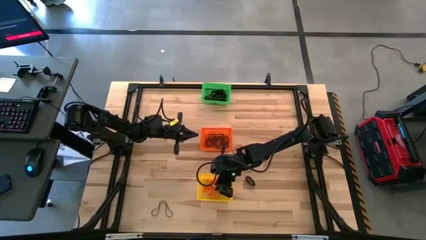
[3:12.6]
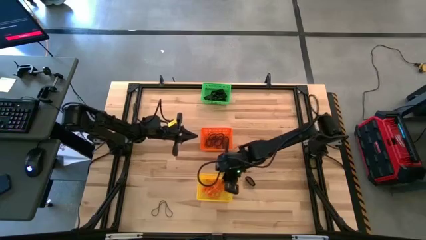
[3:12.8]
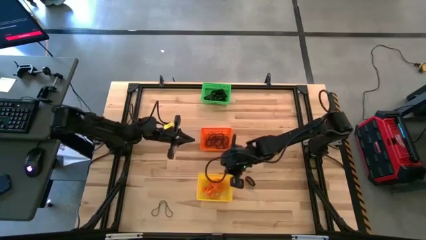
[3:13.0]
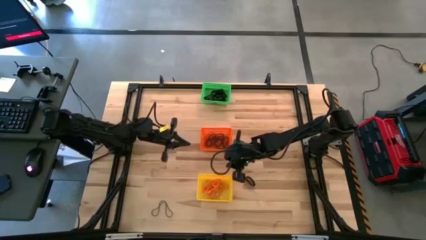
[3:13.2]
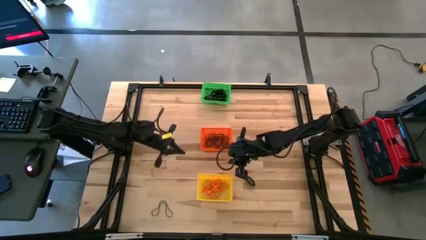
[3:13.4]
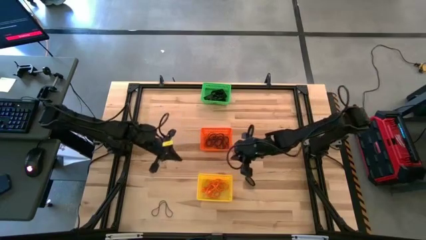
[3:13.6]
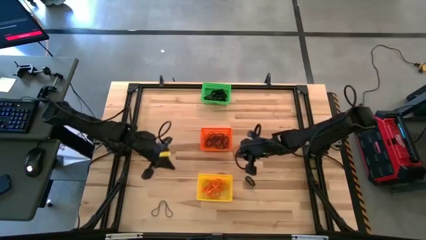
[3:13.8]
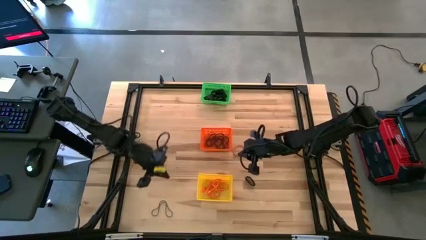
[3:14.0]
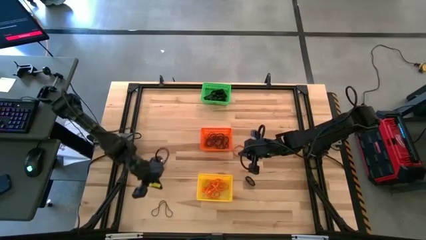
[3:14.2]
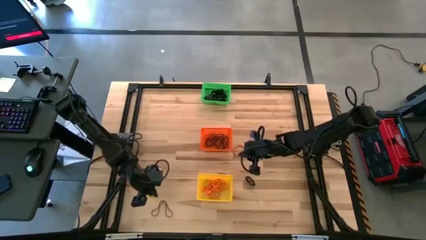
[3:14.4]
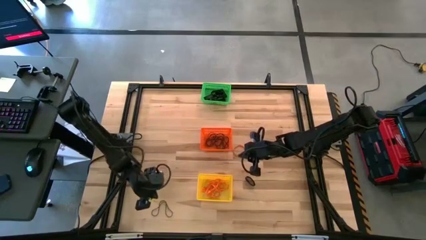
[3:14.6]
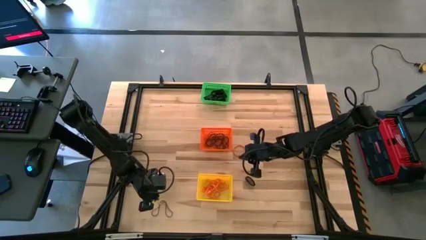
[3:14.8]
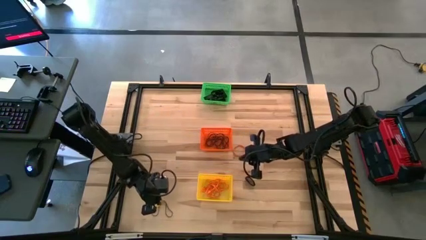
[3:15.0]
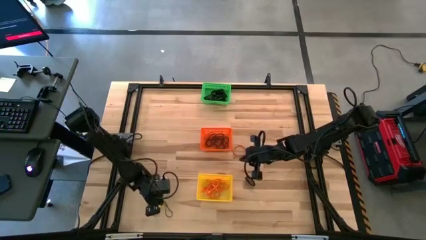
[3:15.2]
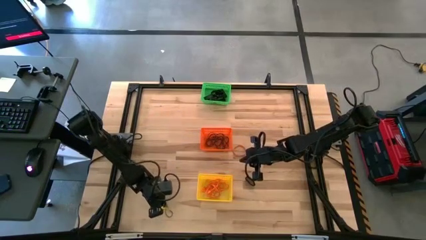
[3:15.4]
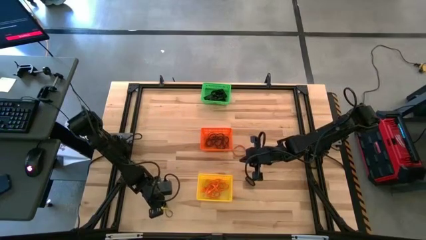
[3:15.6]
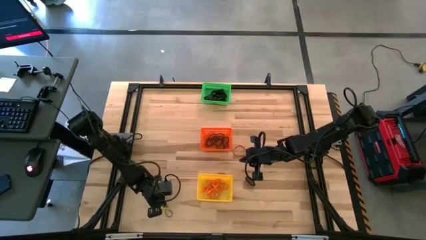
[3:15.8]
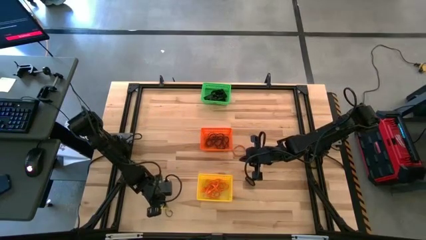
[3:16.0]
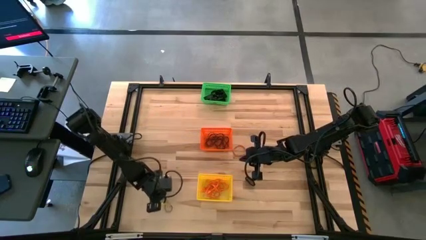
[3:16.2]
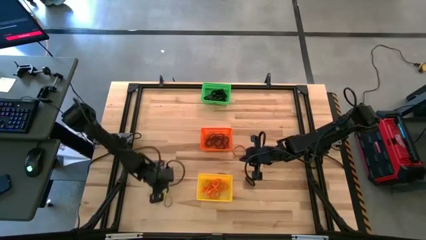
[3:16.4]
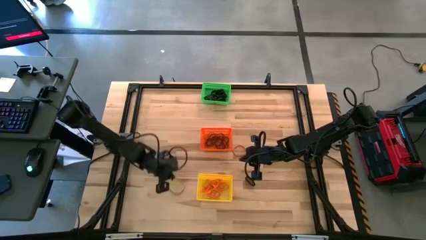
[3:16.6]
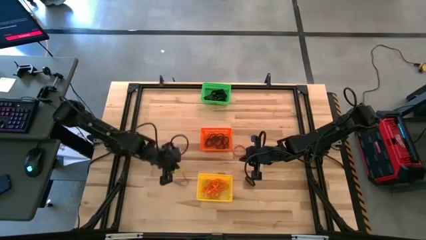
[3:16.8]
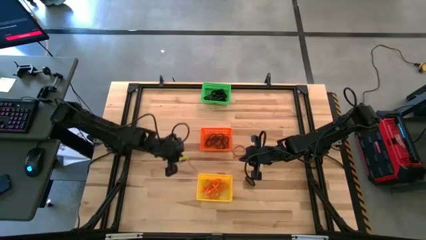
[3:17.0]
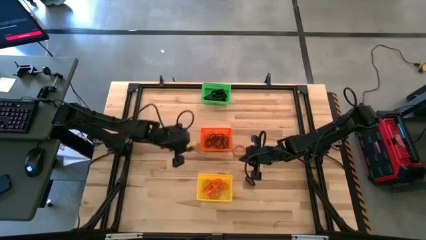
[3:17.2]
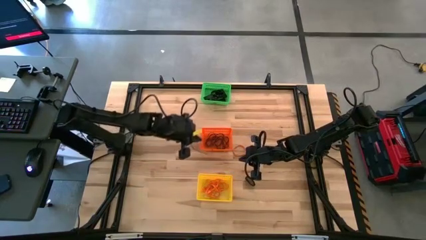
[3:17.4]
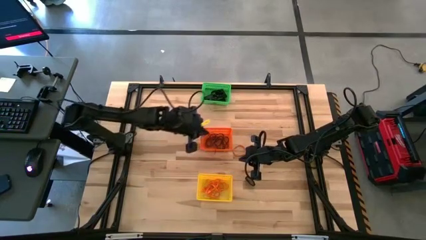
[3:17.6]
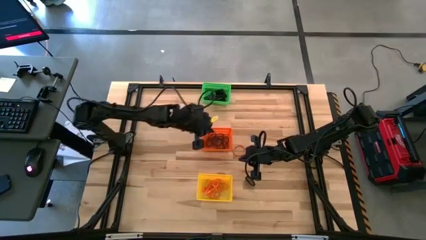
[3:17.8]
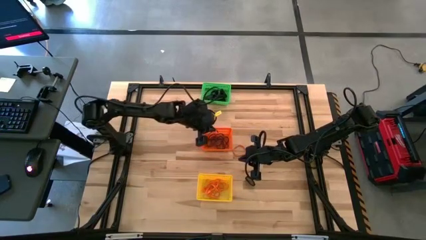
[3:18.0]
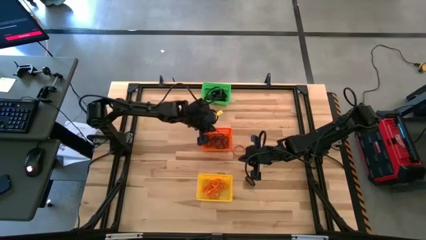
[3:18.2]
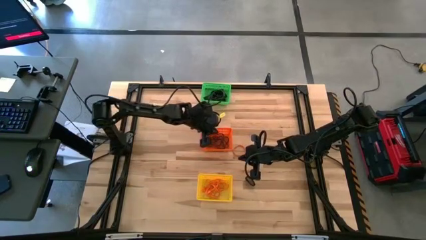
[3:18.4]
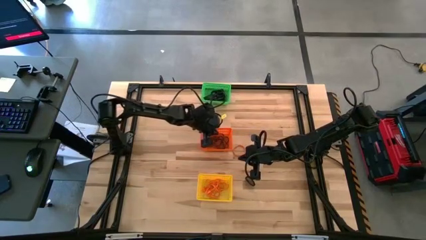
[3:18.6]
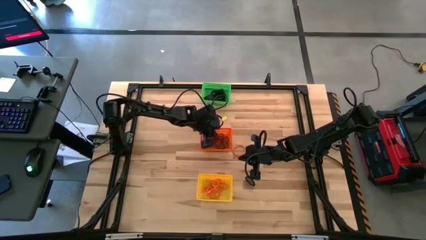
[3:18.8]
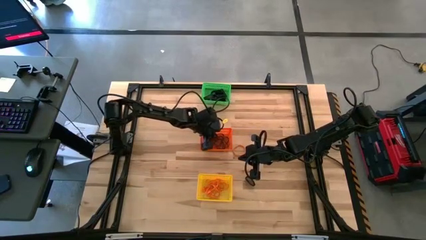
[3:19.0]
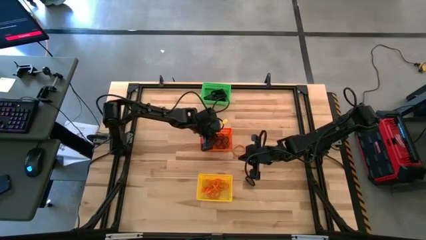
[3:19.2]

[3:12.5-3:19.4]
Task: Sort rubber bands into baskets
Put the purple rubber band into the orange bin

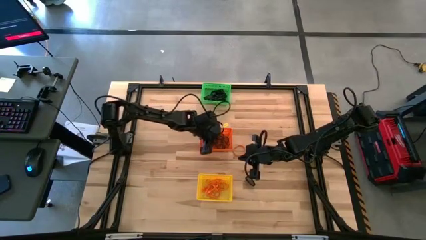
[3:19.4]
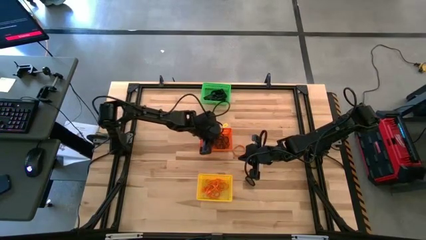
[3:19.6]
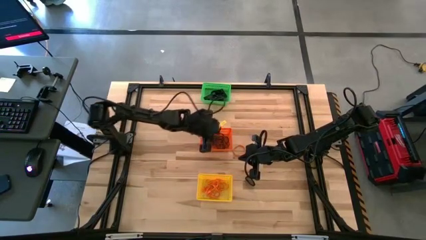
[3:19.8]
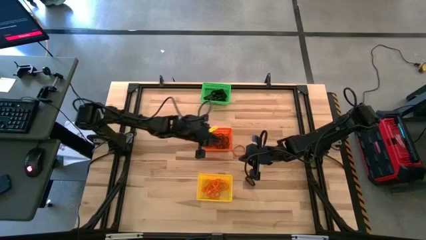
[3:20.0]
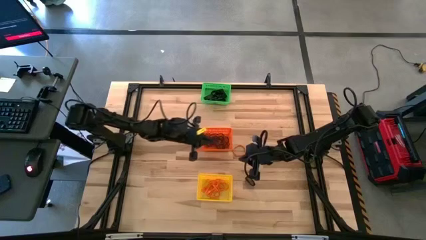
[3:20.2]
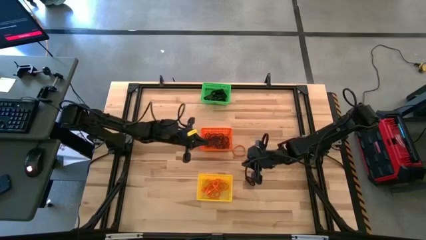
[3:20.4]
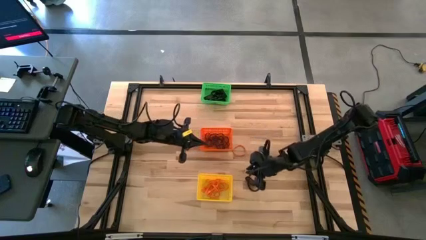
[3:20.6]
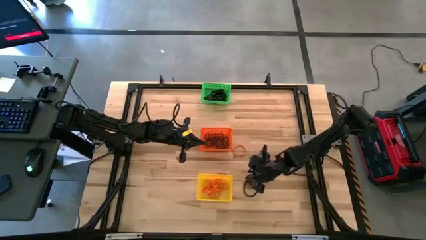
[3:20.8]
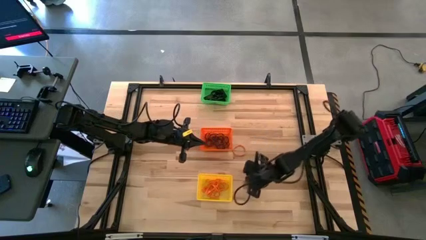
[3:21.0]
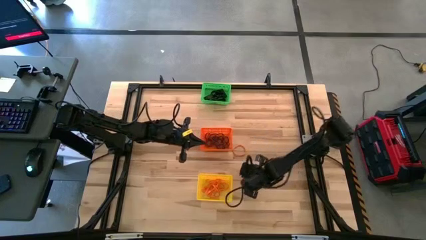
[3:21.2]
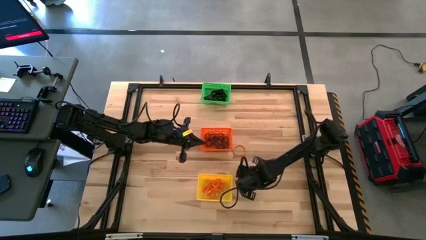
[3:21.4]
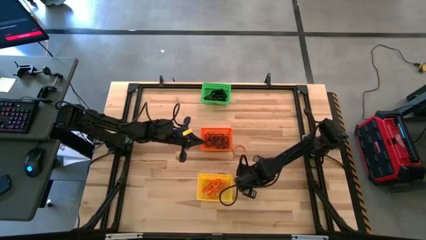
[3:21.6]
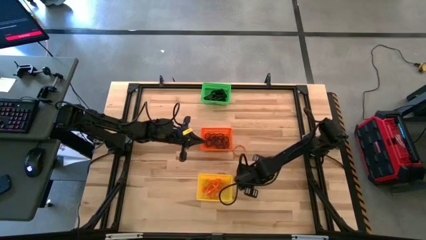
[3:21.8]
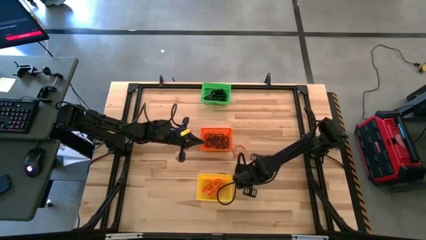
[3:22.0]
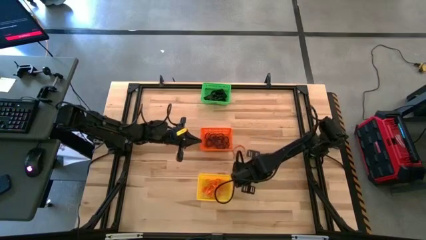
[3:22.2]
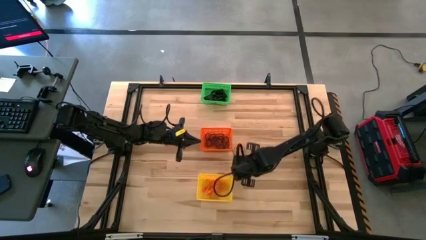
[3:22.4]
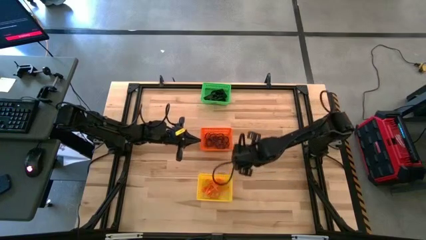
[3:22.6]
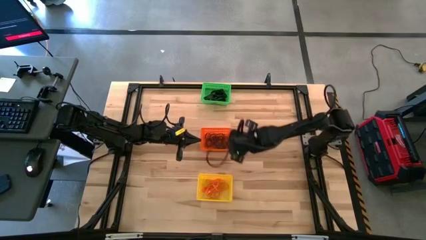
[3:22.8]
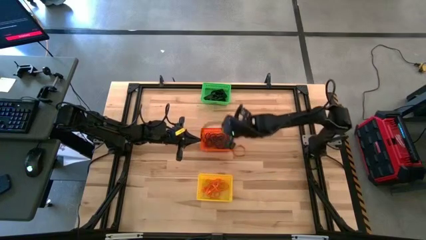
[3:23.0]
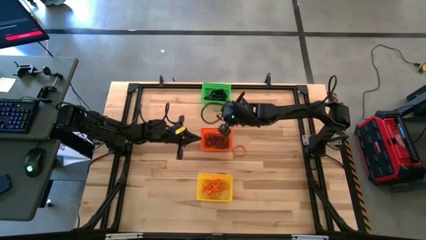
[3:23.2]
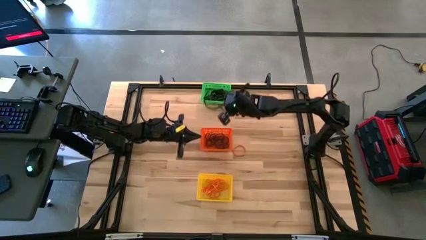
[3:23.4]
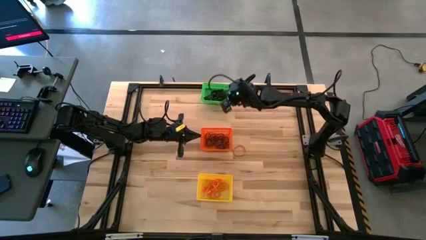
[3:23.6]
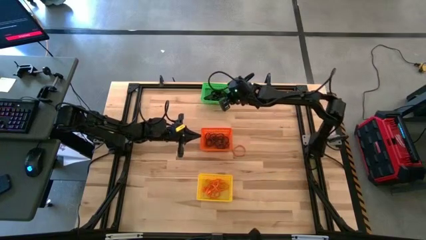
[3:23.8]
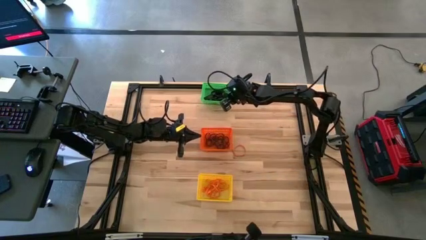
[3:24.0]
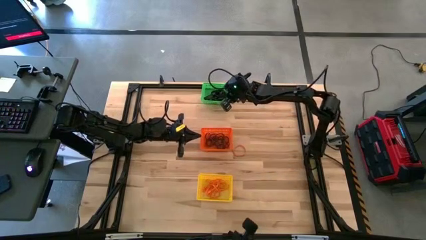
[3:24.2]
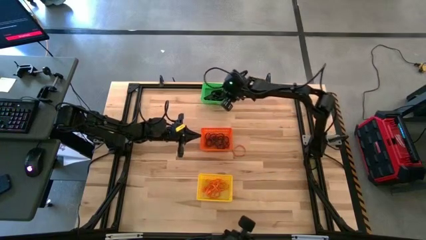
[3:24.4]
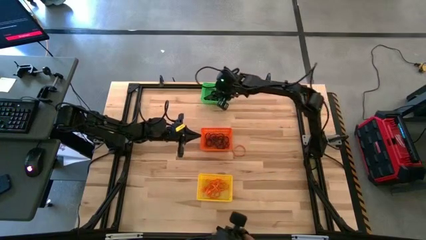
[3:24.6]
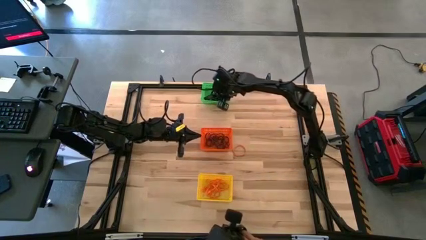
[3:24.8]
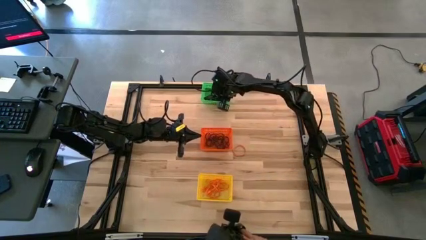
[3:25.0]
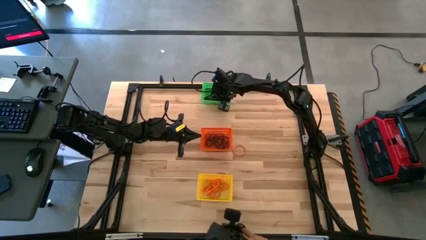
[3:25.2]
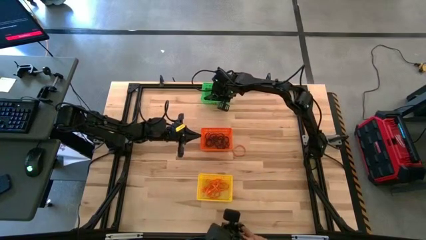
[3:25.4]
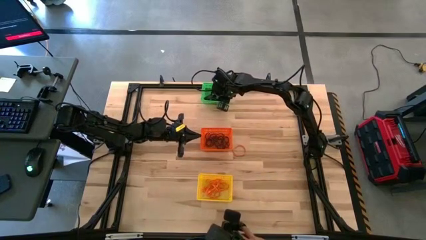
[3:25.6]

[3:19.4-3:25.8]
Put the black rubber band into the green bin
